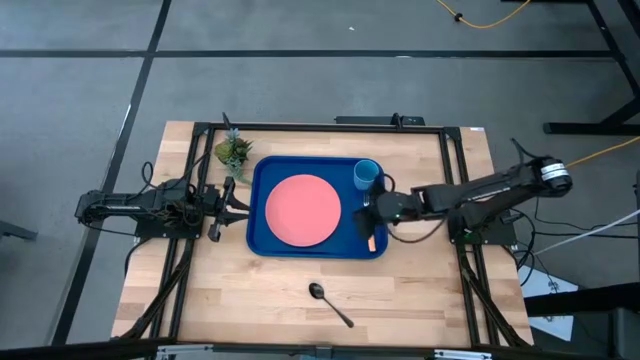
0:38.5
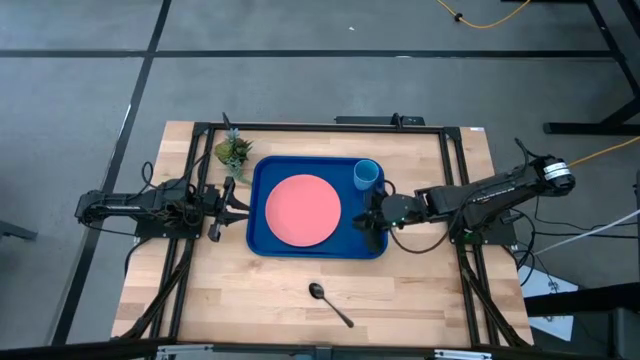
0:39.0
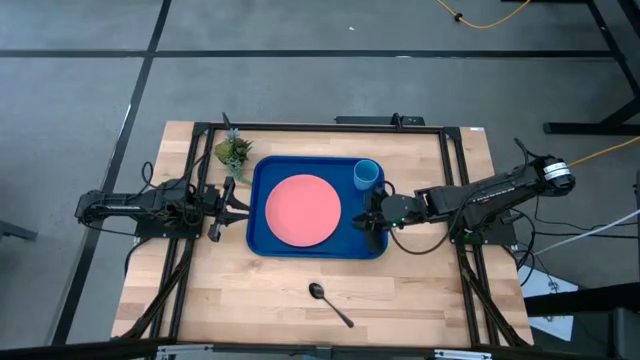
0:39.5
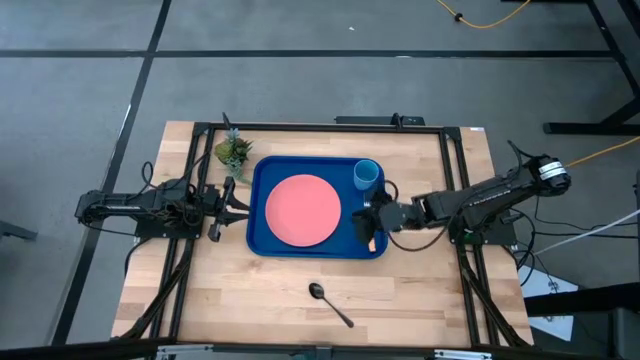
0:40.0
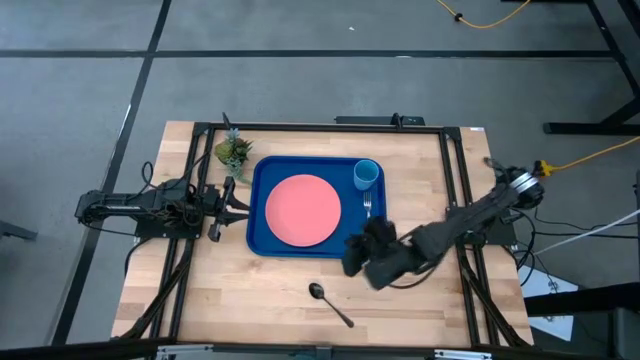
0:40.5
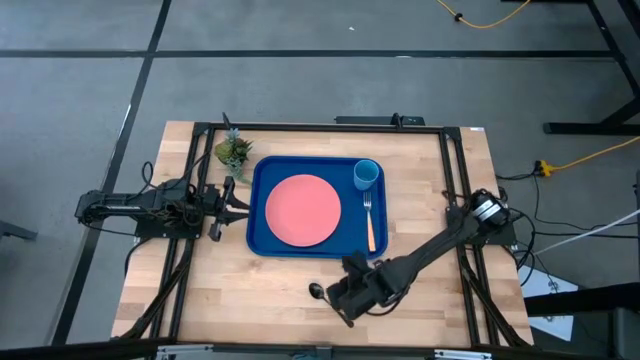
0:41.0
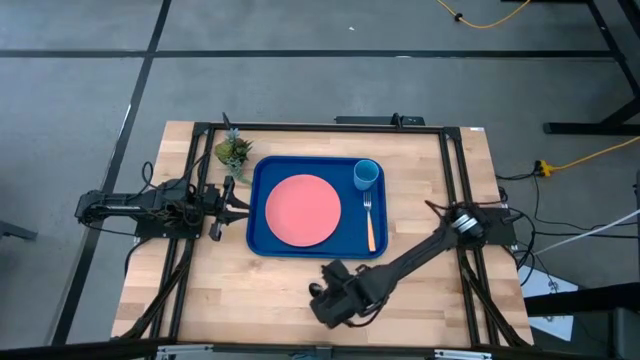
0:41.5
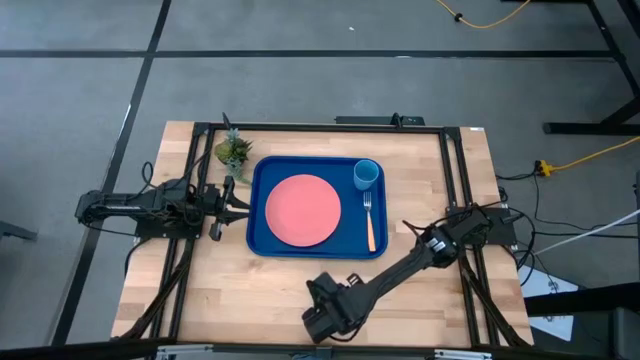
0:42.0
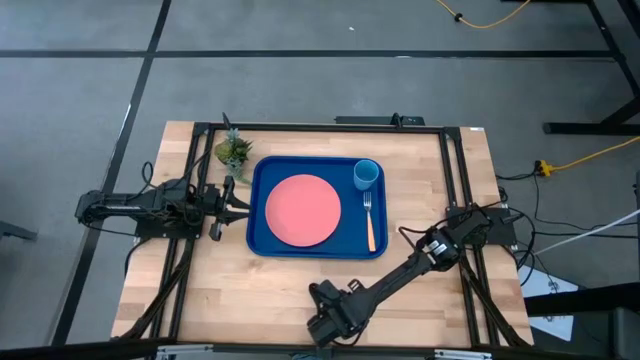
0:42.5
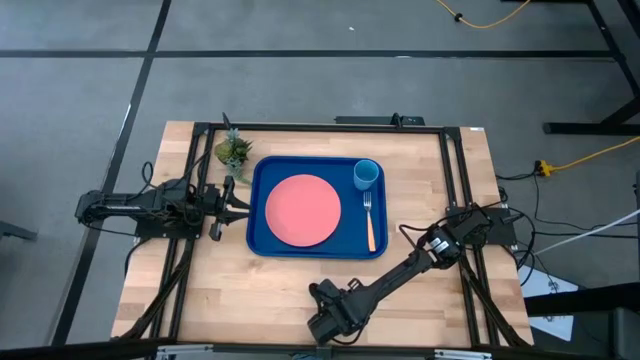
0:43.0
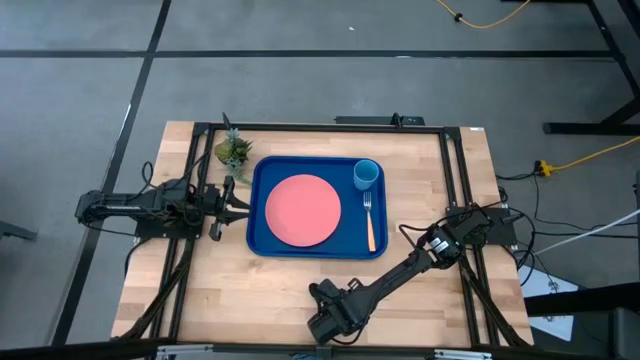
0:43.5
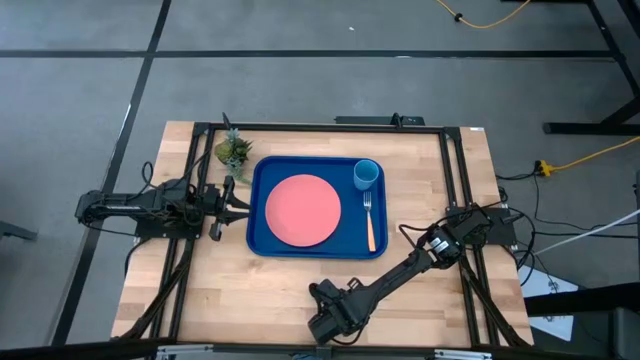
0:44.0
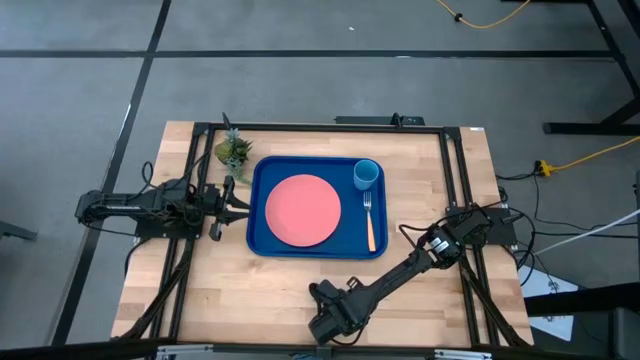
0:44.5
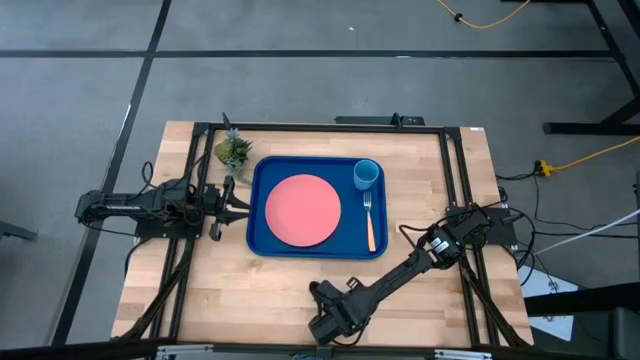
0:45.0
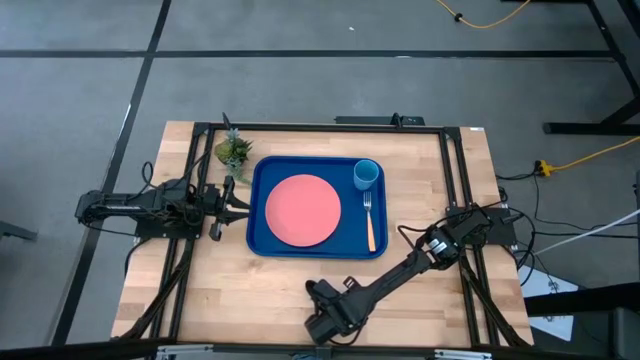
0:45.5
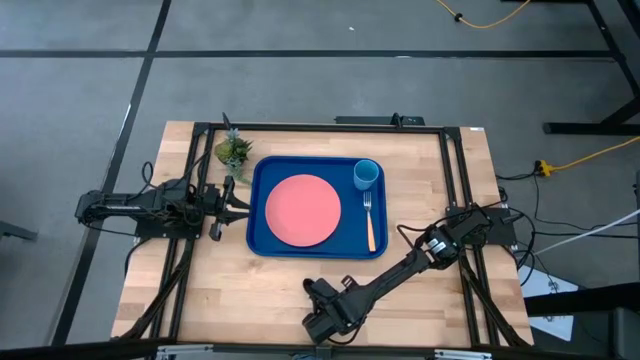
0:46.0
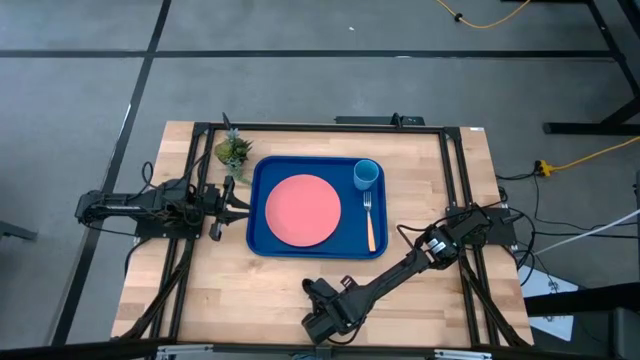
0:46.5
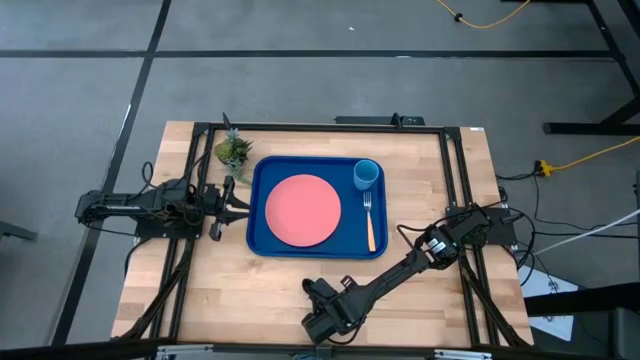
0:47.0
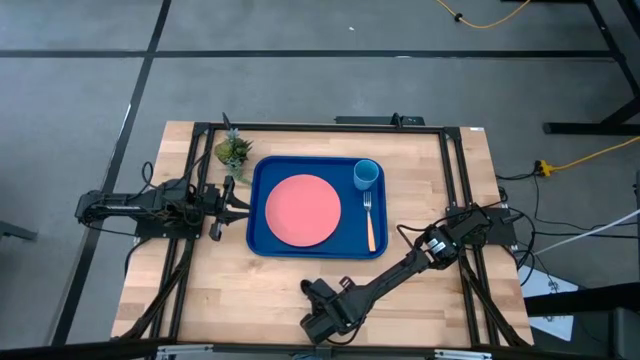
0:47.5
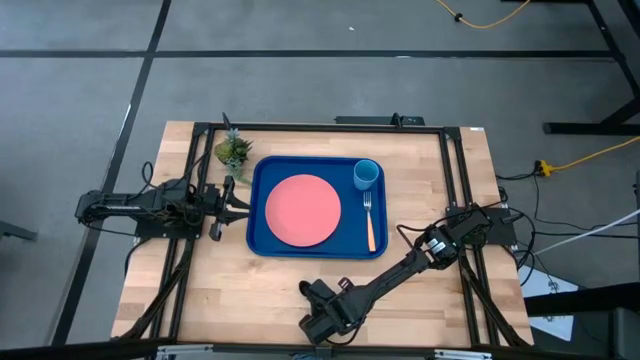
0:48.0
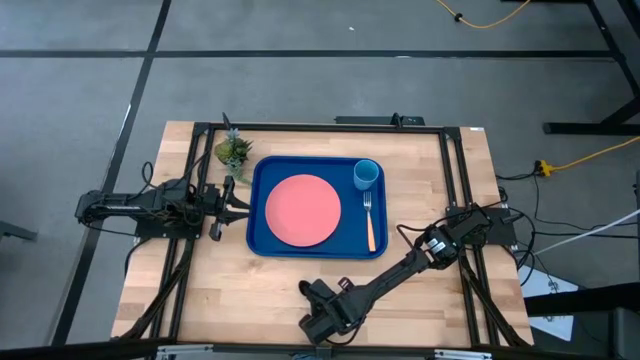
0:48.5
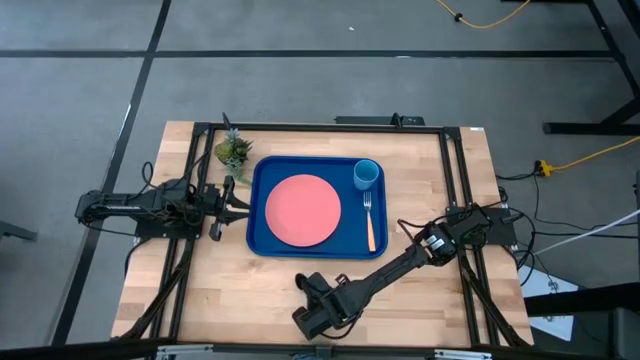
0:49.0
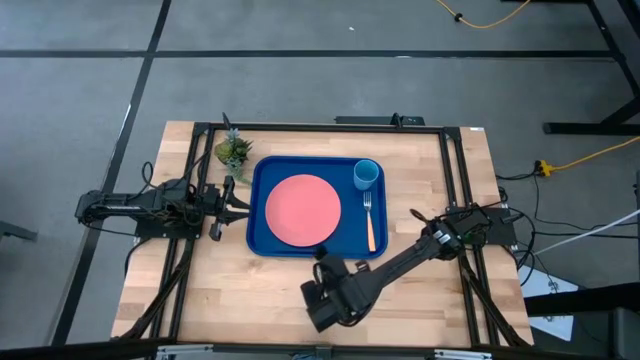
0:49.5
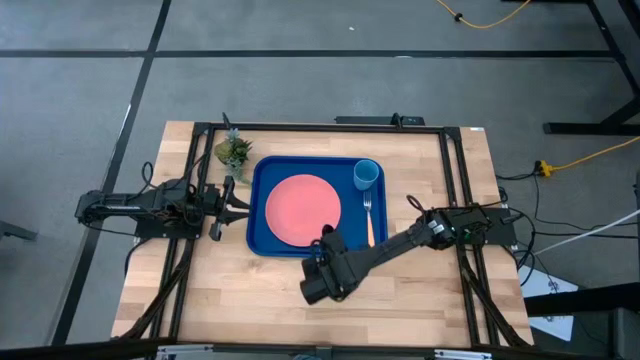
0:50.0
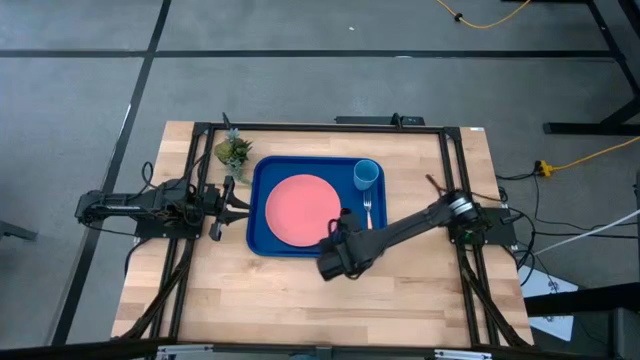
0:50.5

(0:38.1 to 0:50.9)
Task: Pick and place plate/cup/fork/spoon on tray
Put the black spoon on the left side of the brown fork on the blue tray

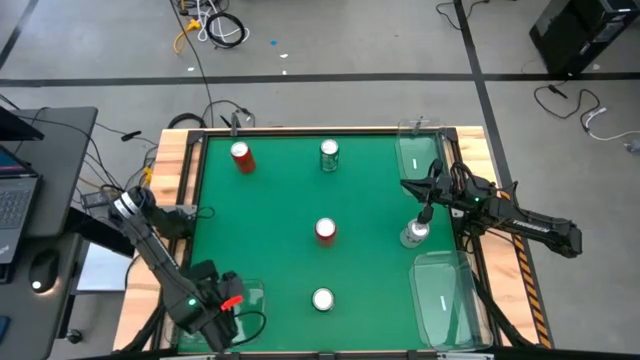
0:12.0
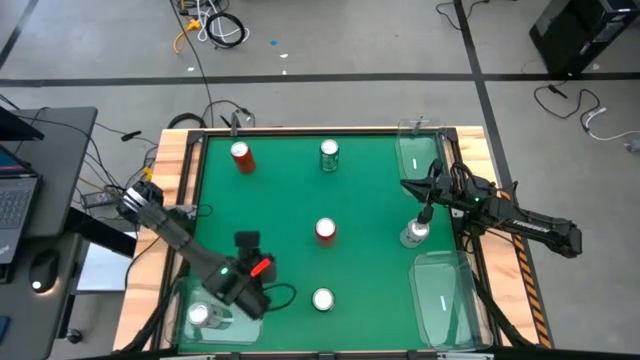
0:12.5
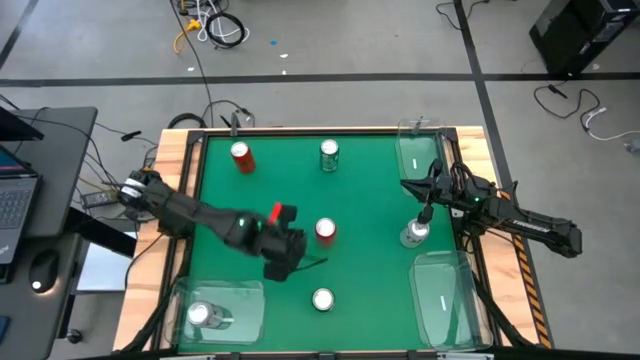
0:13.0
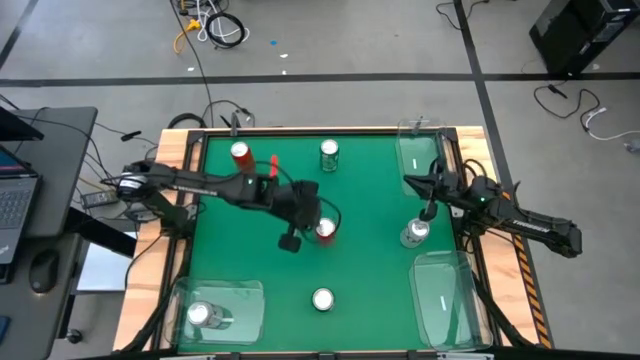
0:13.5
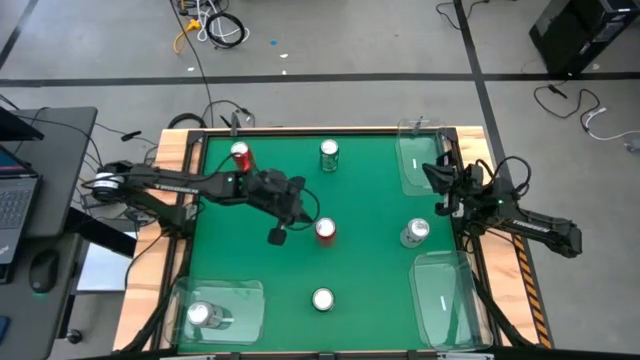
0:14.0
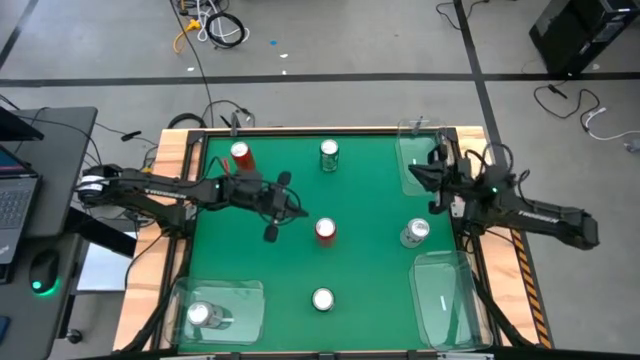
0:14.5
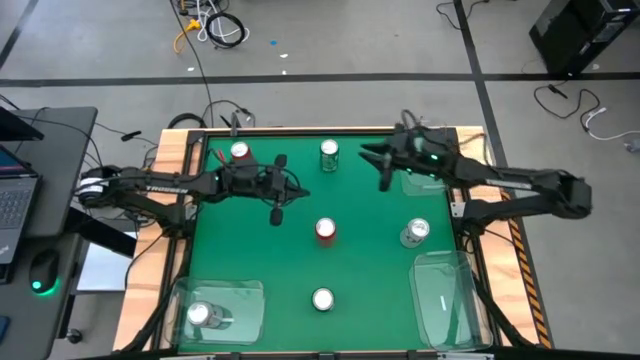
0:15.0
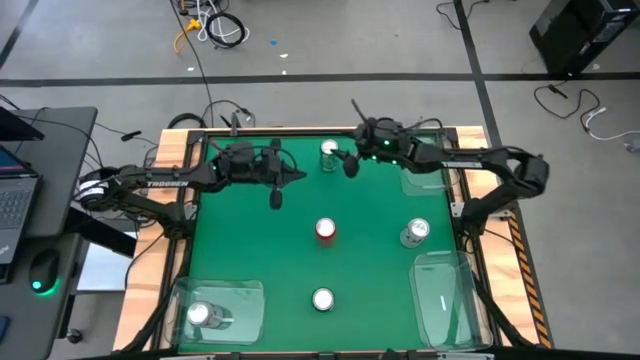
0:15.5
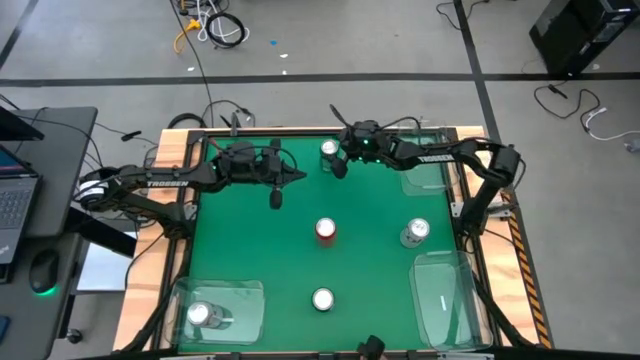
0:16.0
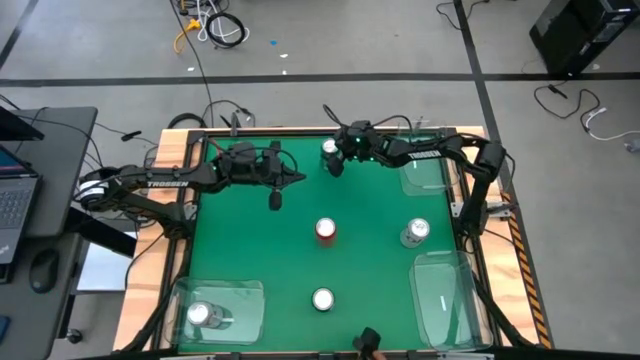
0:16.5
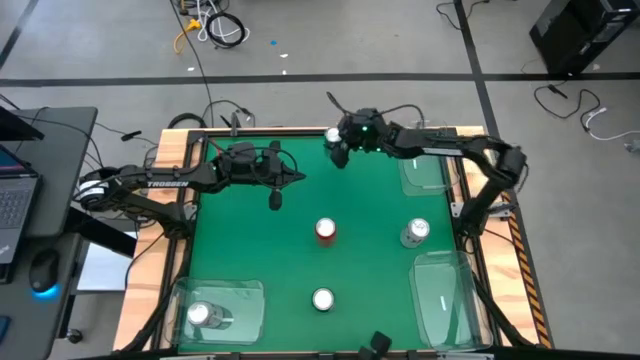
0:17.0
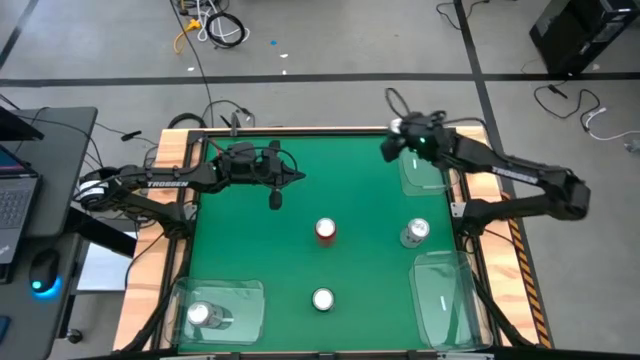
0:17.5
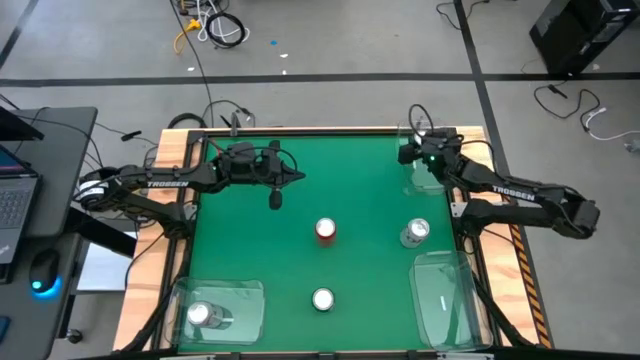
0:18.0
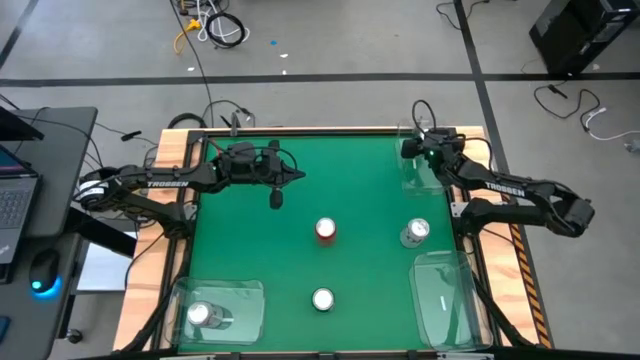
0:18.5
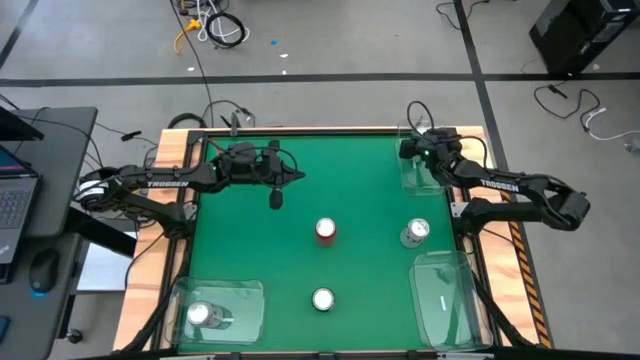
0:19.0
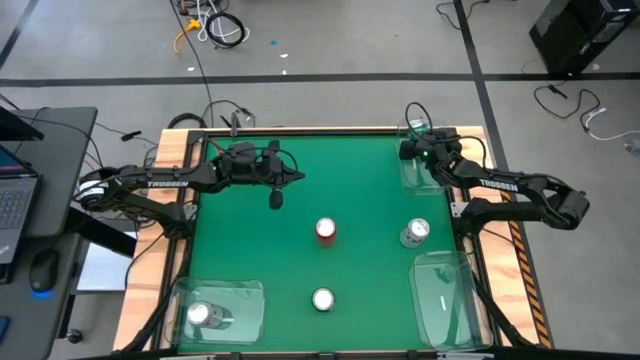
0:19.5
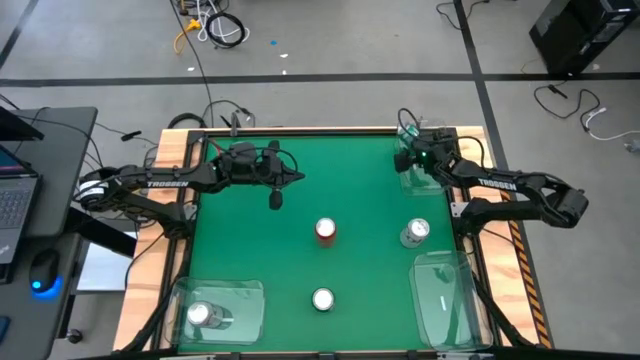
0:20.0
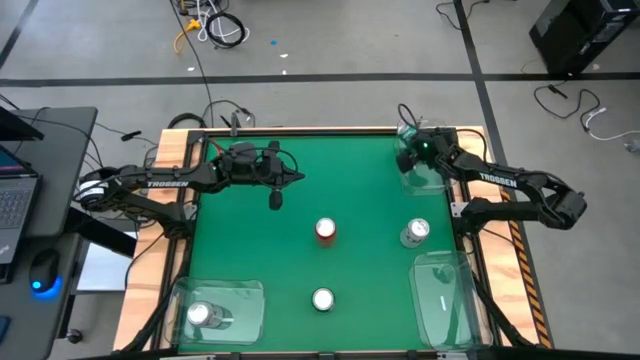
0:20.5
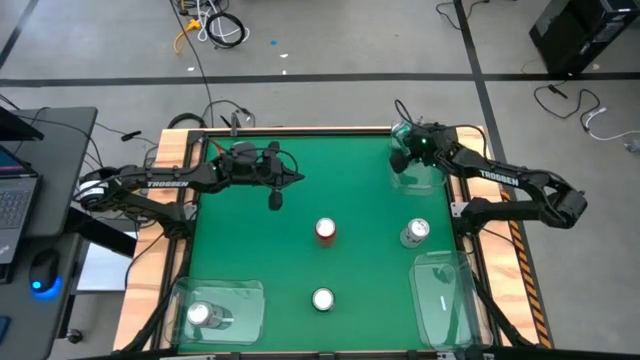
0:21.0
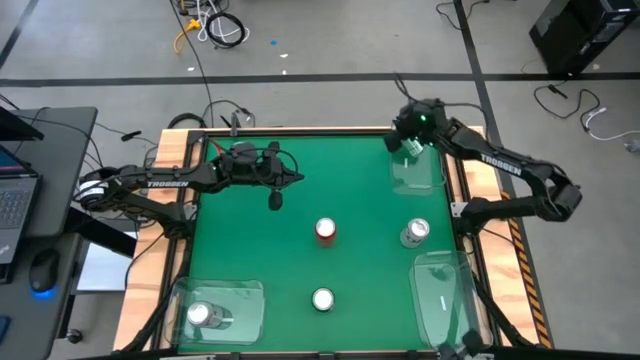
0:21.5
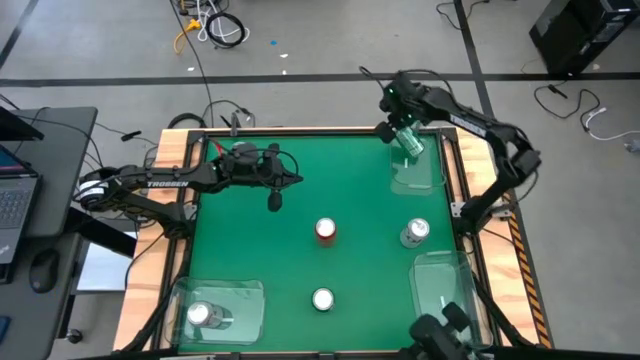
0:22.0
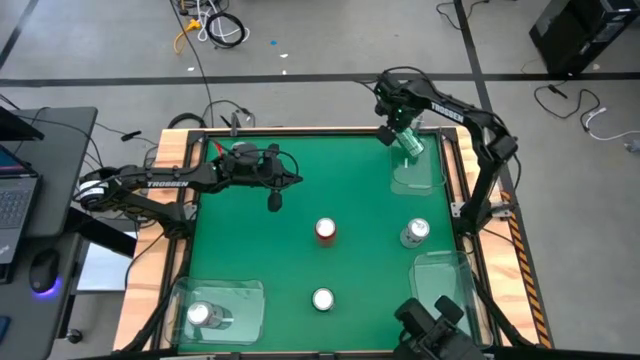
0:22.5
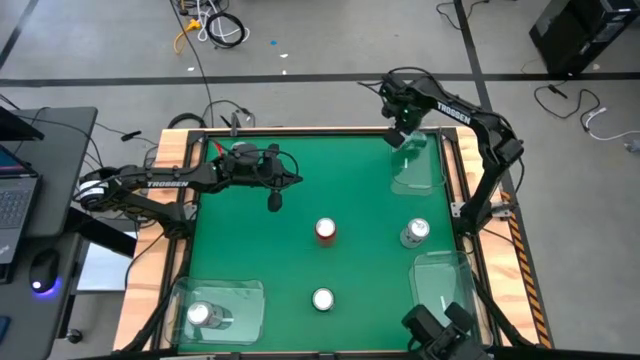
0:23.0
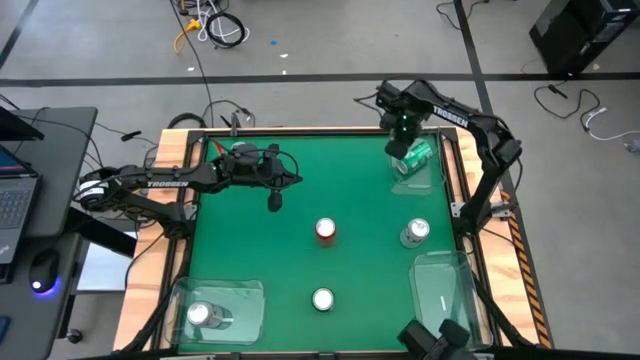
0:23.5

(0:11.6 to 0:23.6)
Task: Sort soda cans
Put the top green soda can into the top right transparent bin
